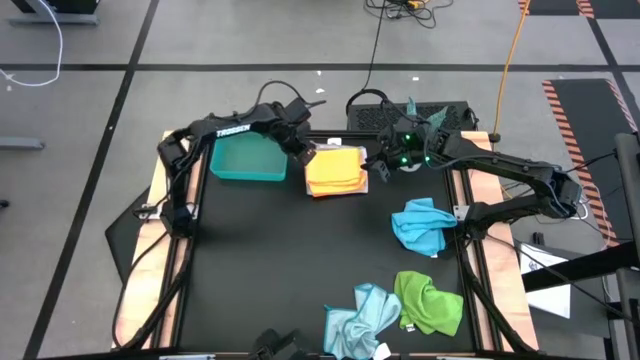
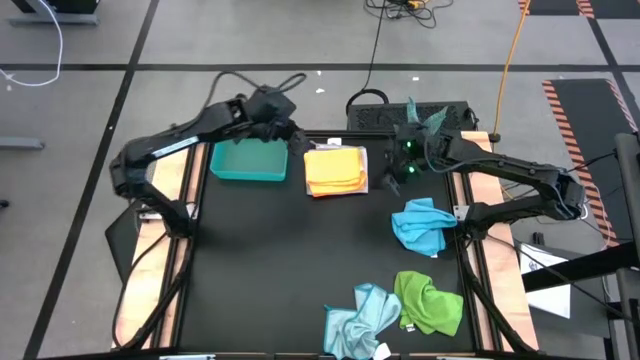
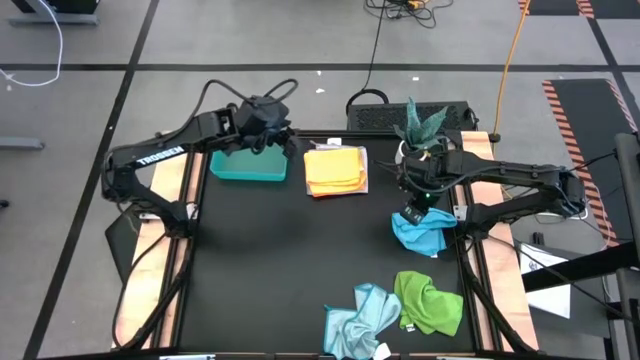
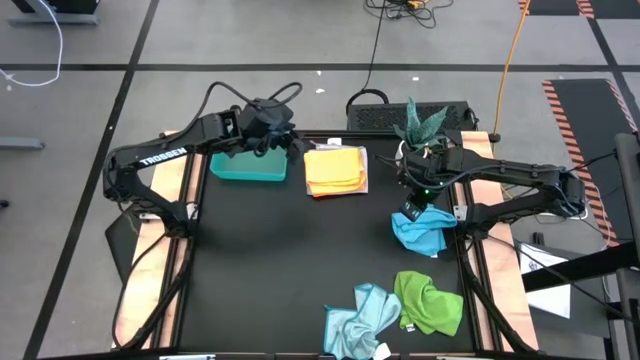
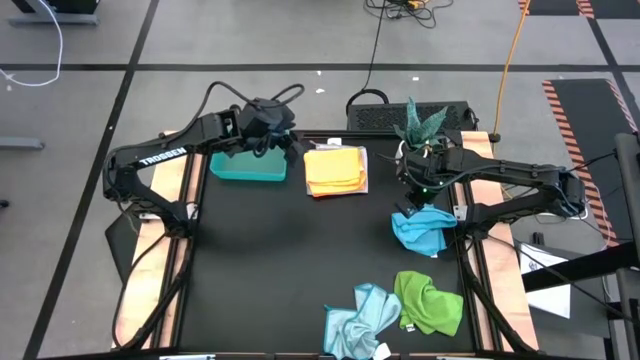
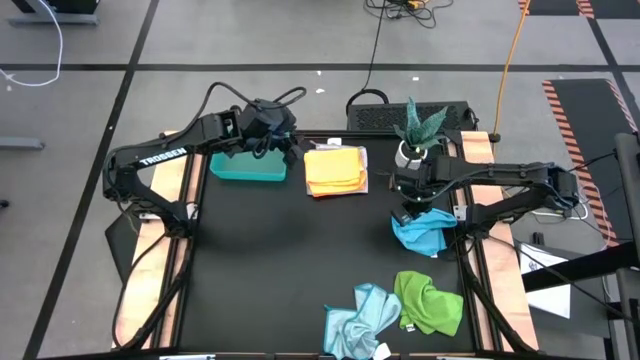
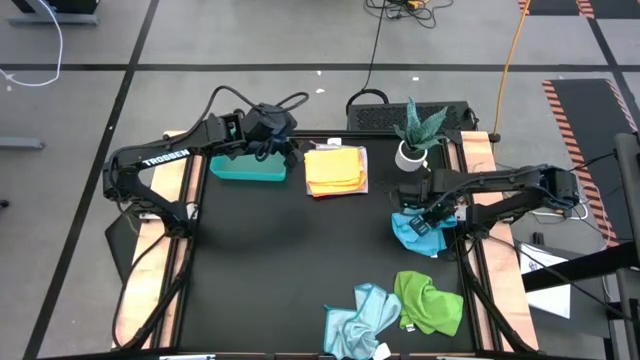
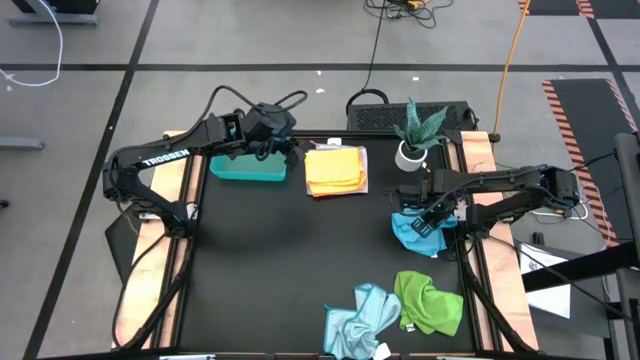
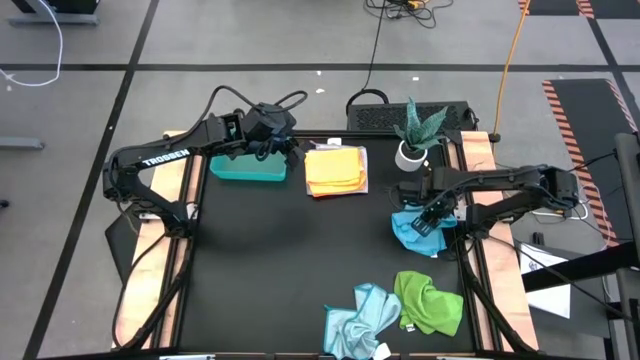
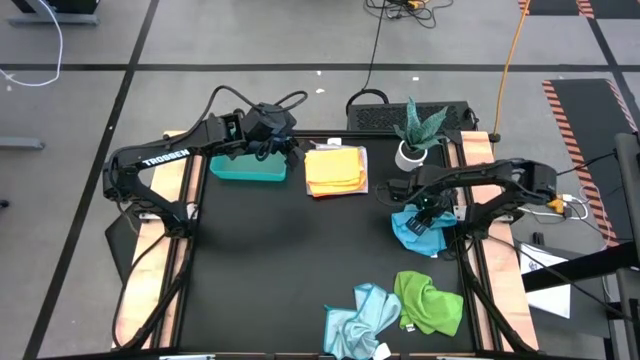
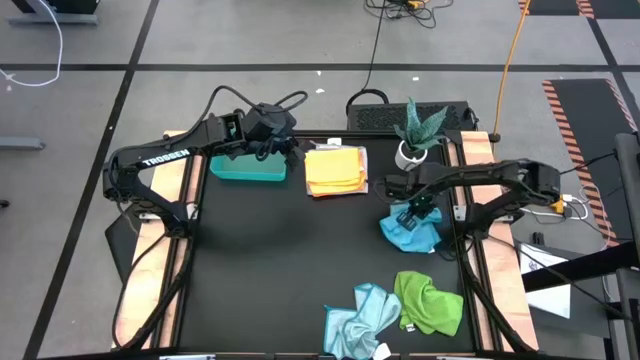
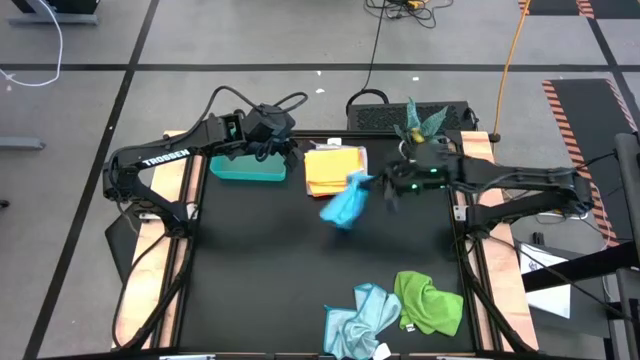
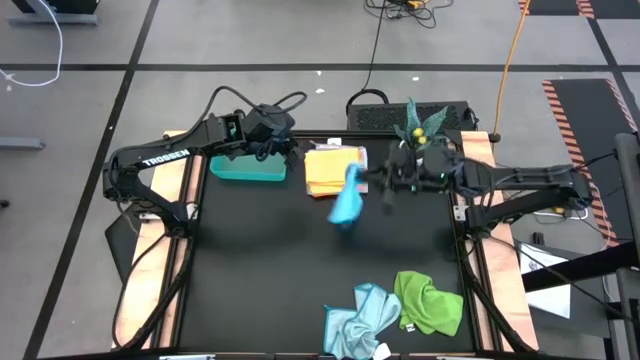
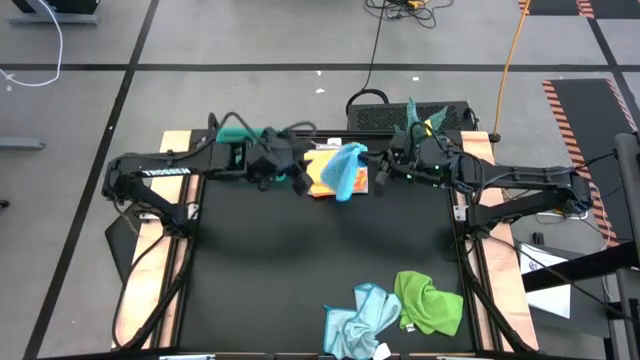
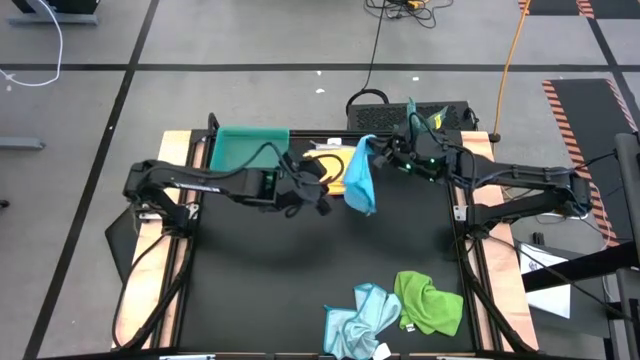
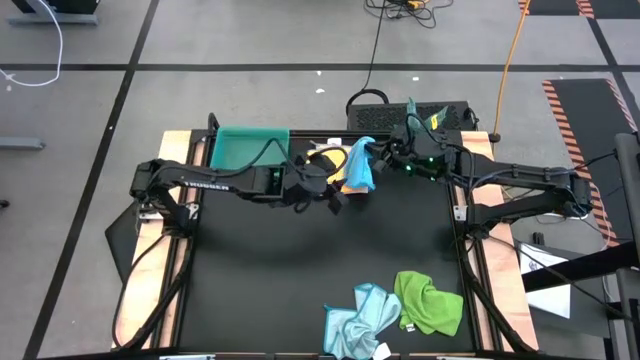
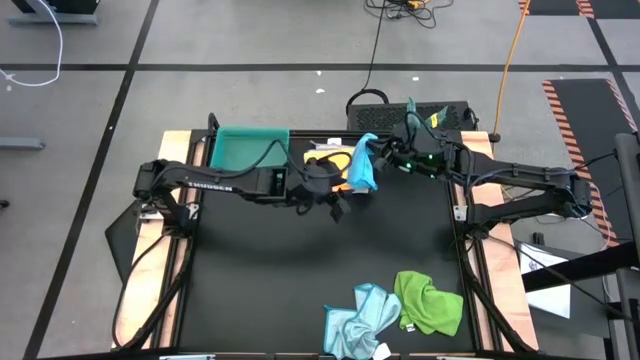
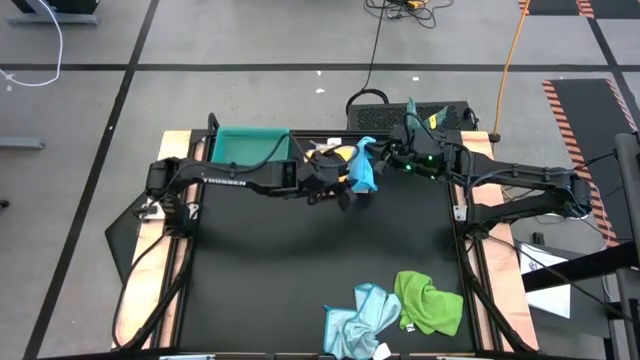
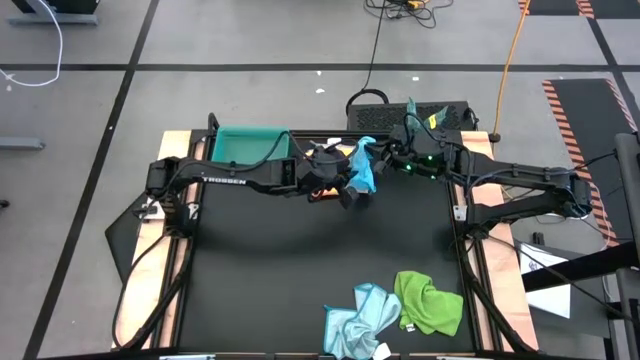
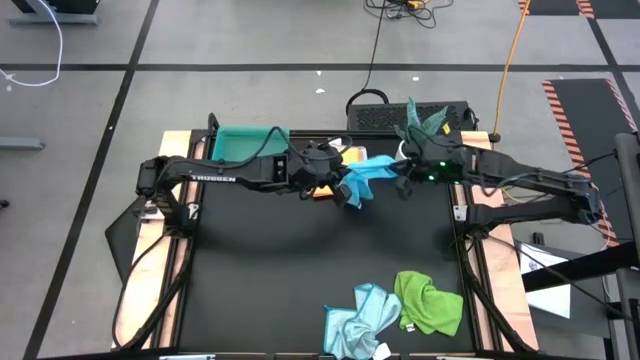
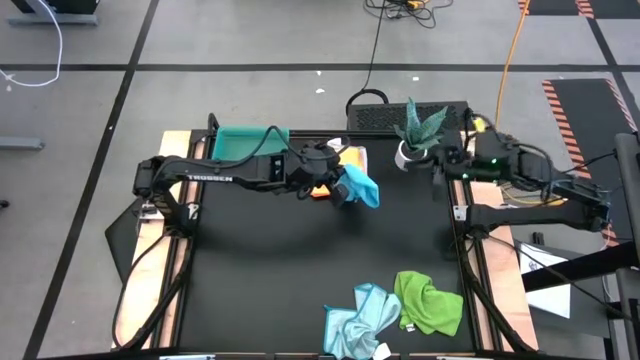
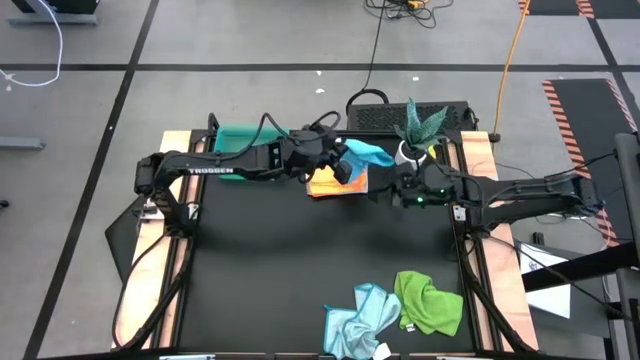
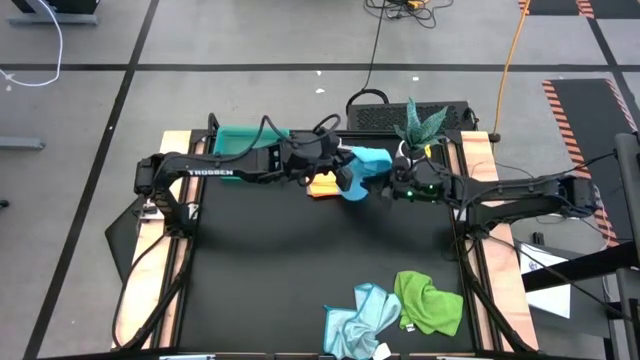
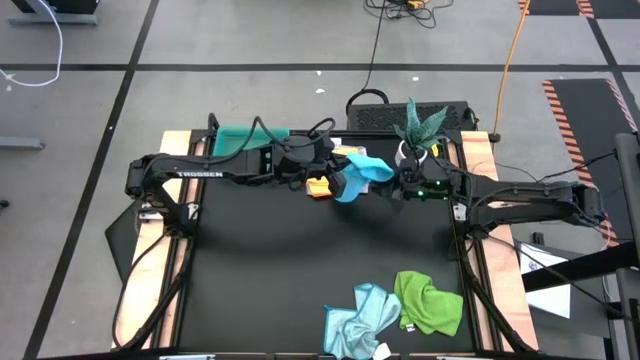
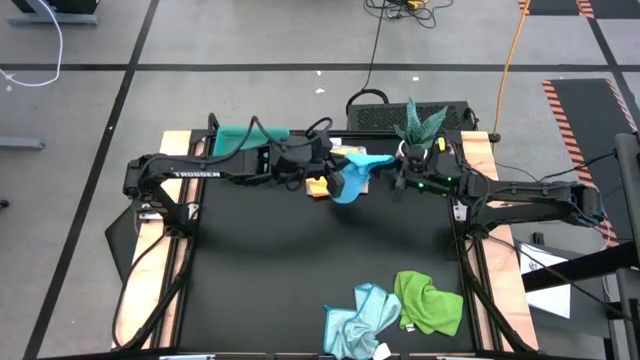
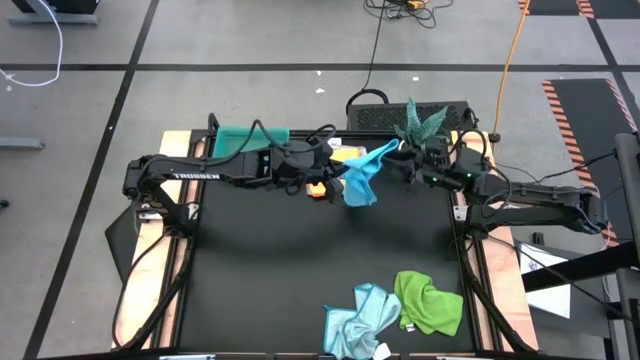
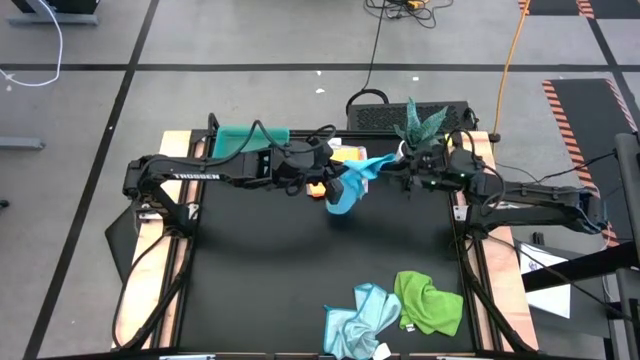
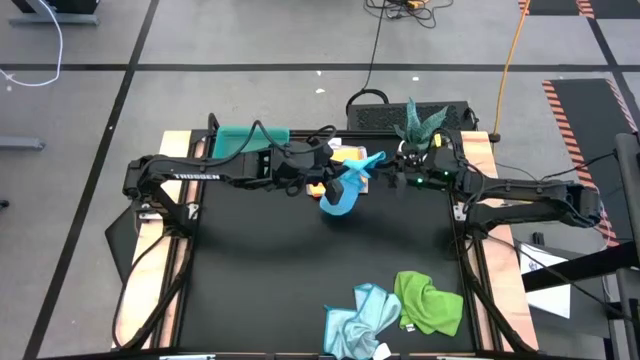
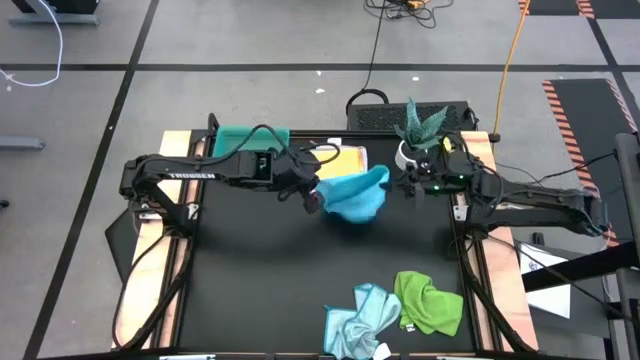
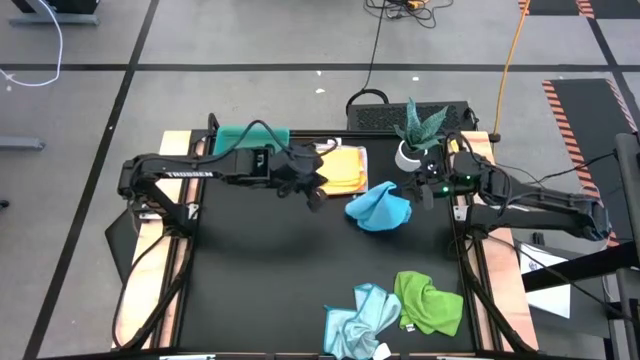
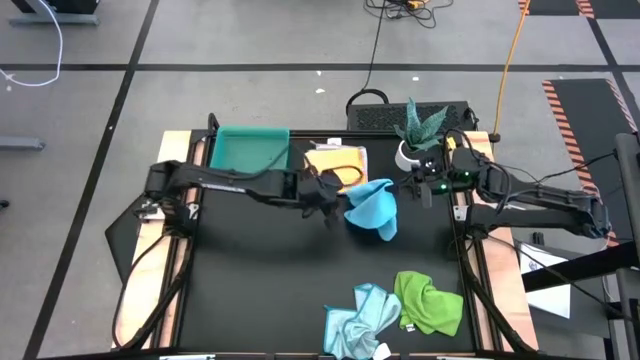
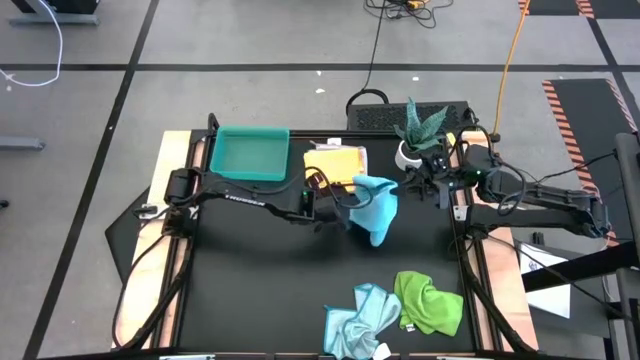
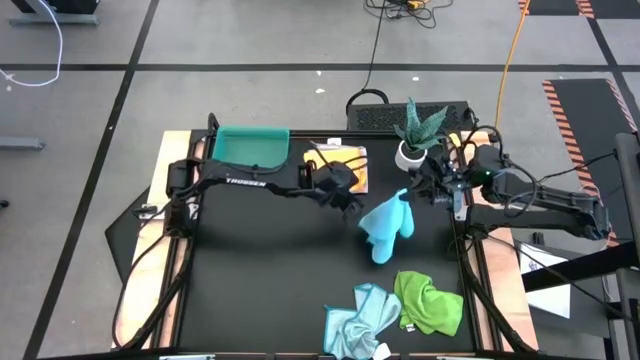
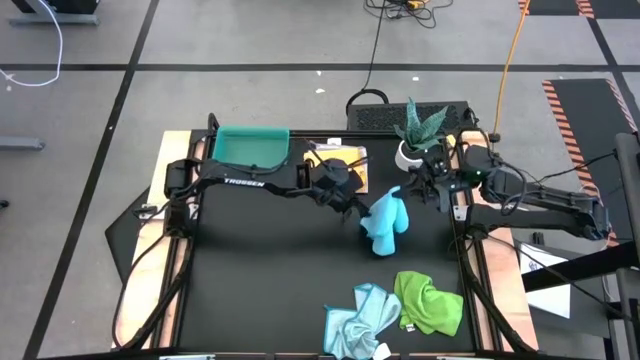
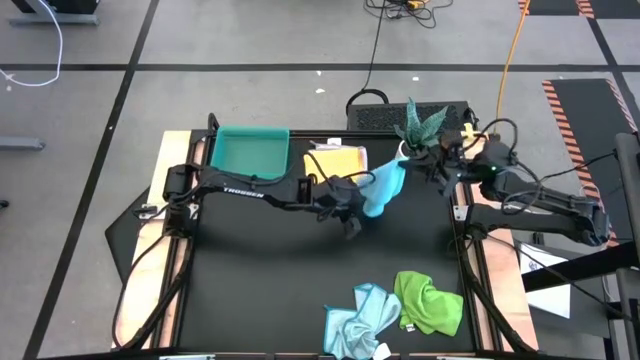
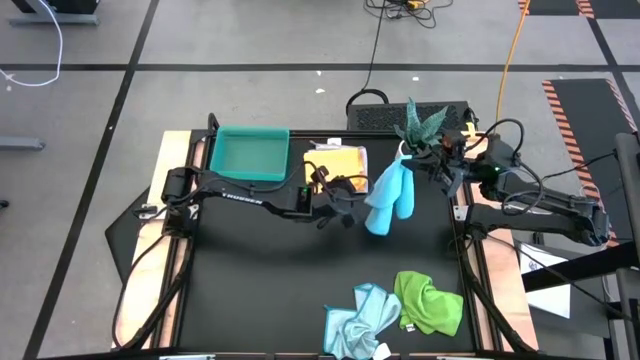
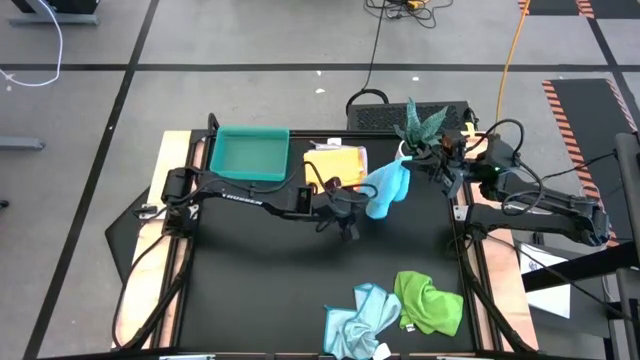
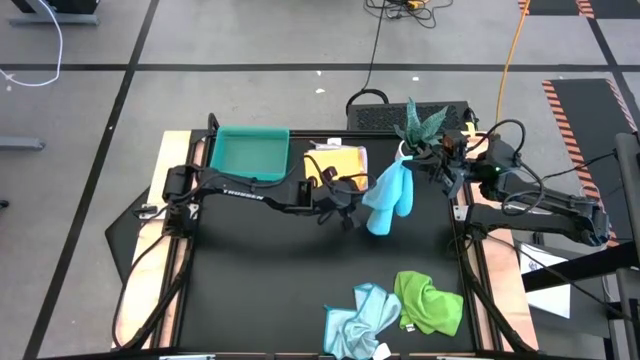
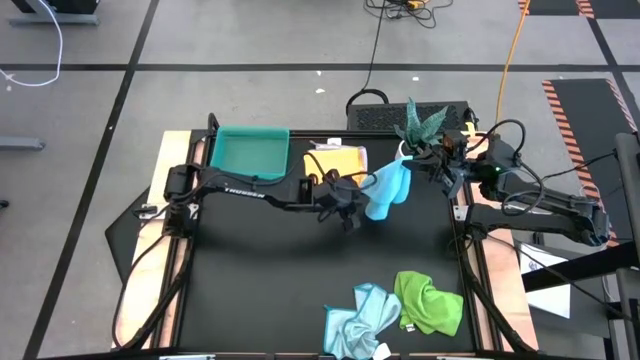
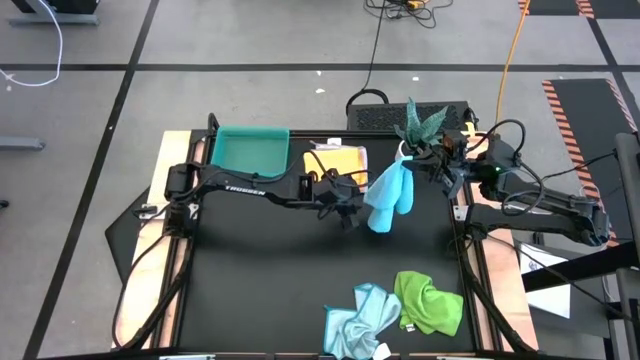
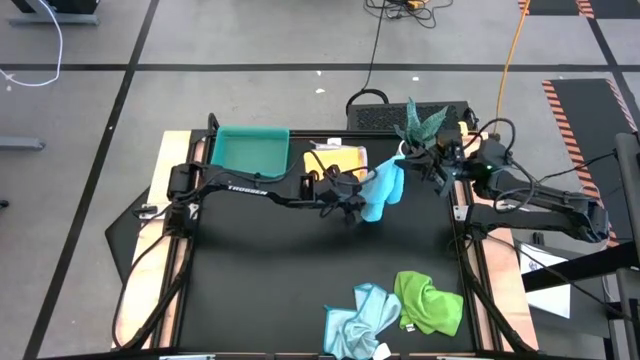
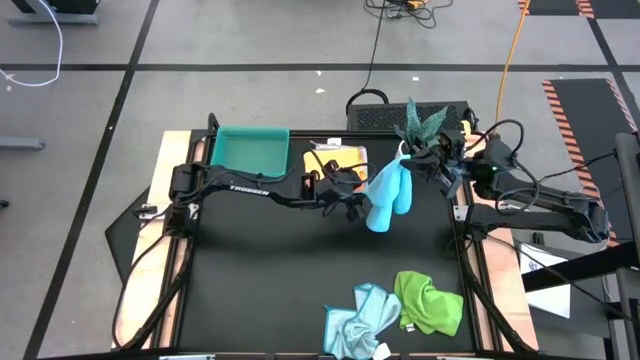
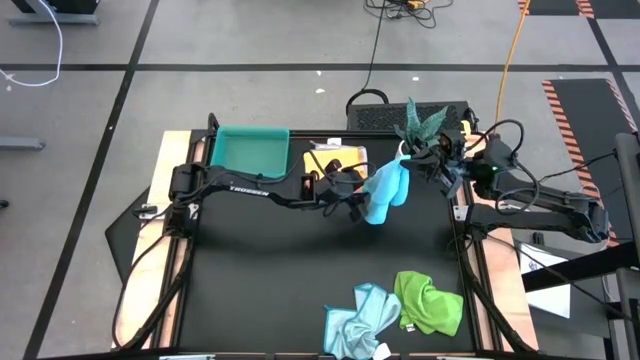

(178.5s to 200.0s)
Task: Fold microfiber towels
Fold the blue microfiber towel

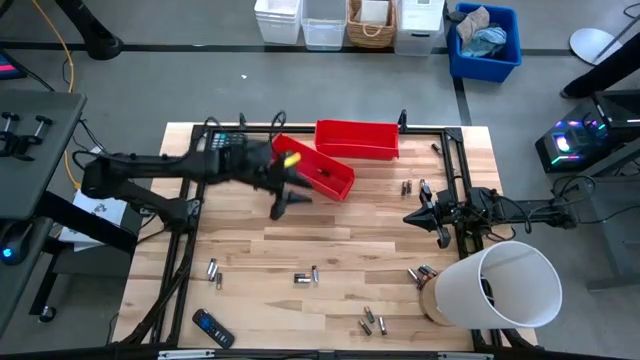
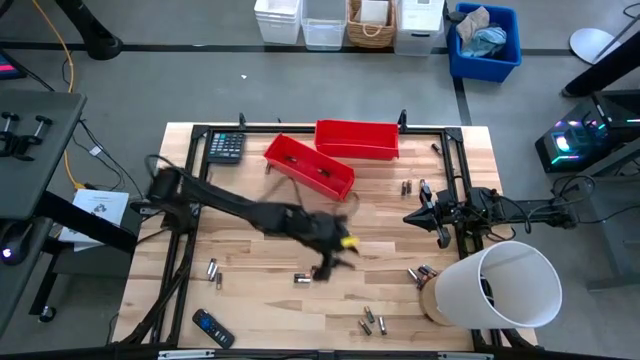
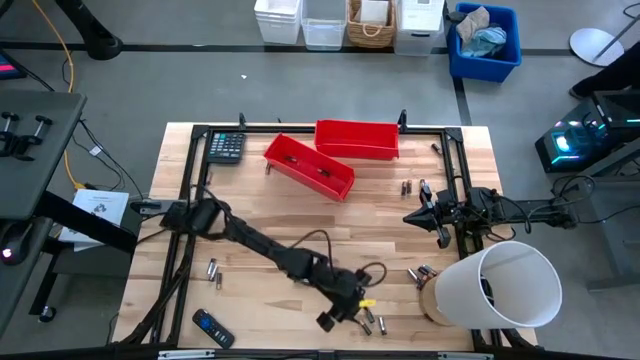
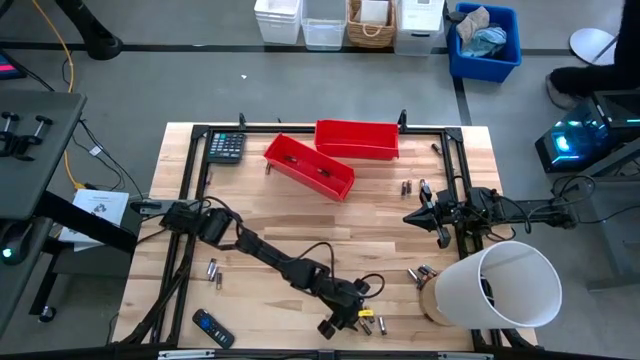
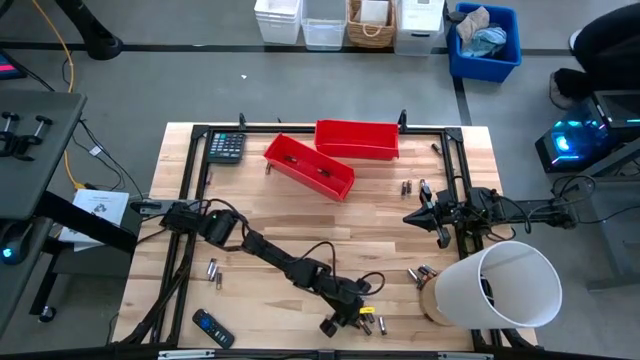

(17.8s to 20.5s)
Task: Sort batteries
Put the black battery into the bottom red bin
